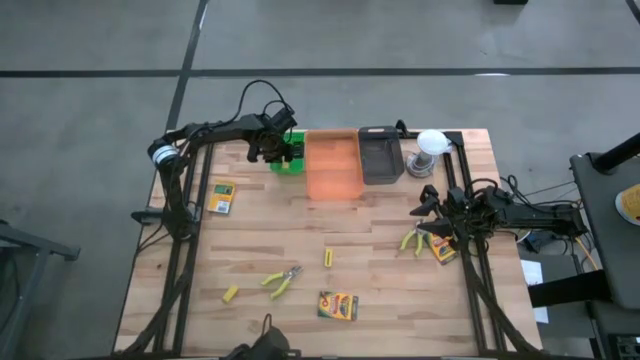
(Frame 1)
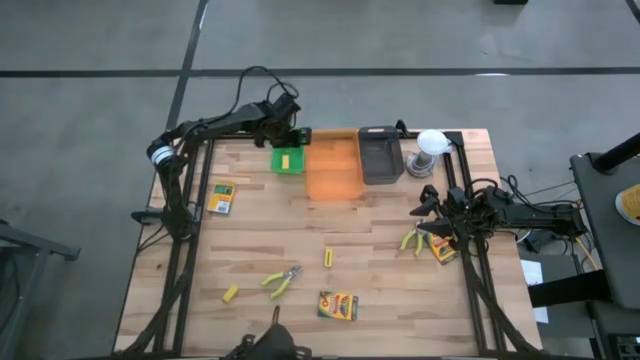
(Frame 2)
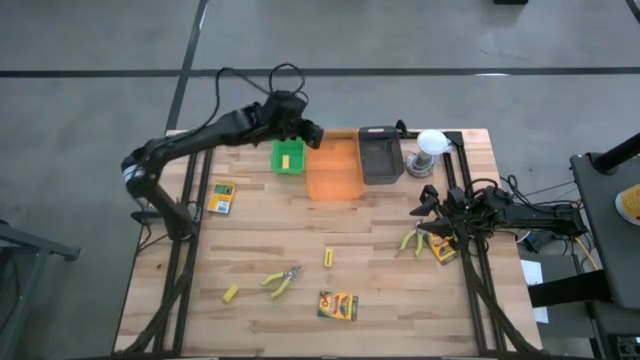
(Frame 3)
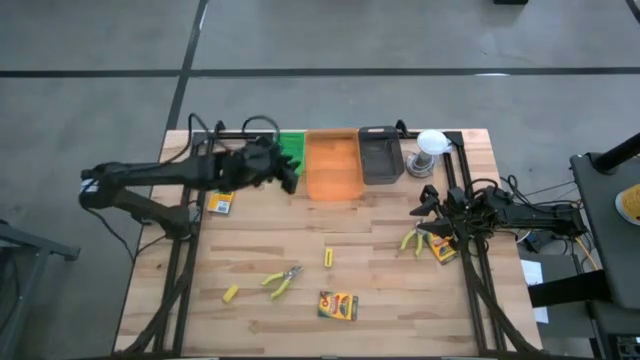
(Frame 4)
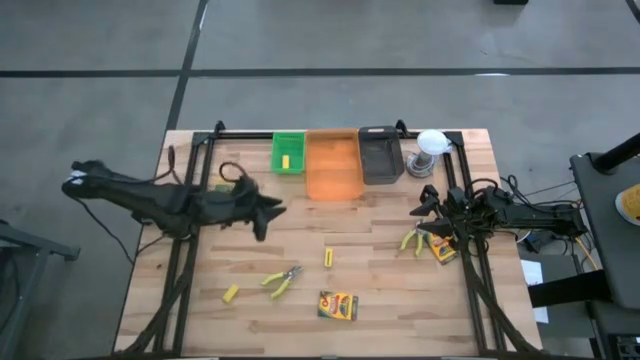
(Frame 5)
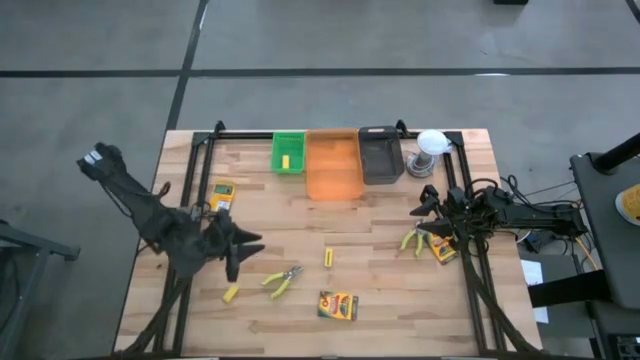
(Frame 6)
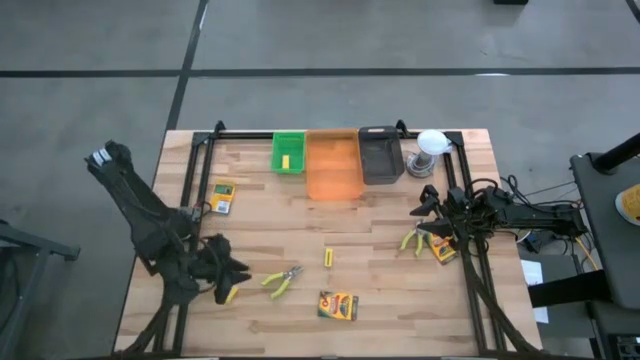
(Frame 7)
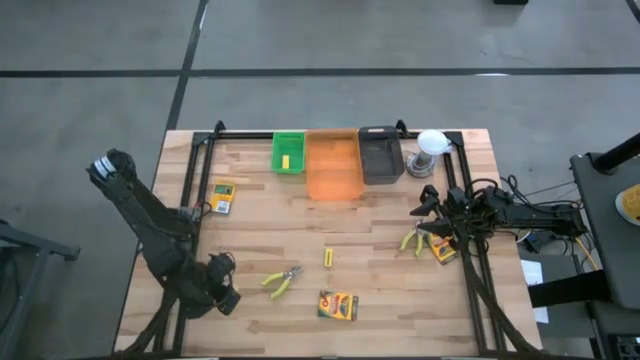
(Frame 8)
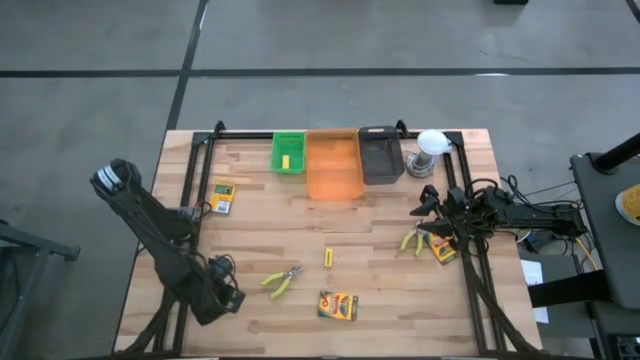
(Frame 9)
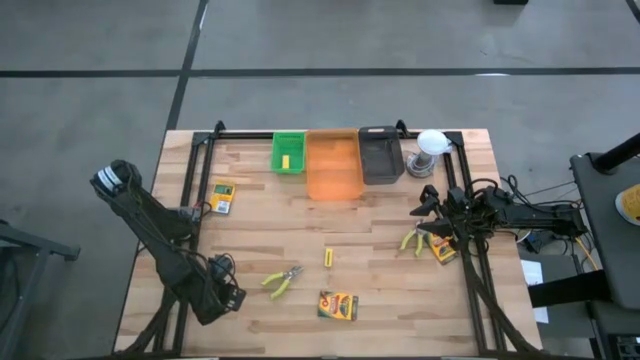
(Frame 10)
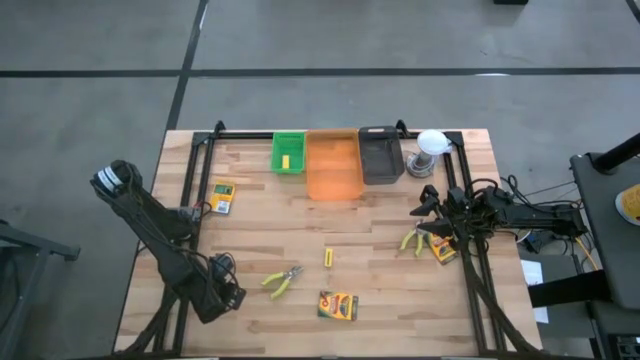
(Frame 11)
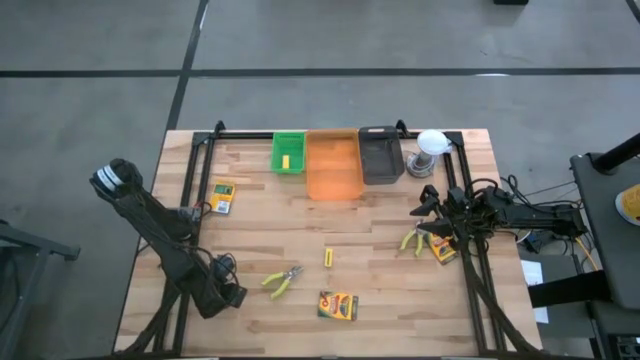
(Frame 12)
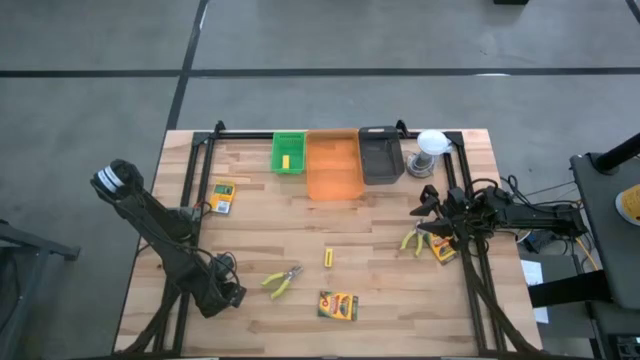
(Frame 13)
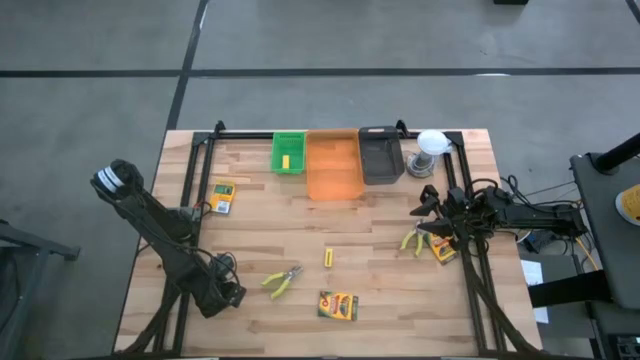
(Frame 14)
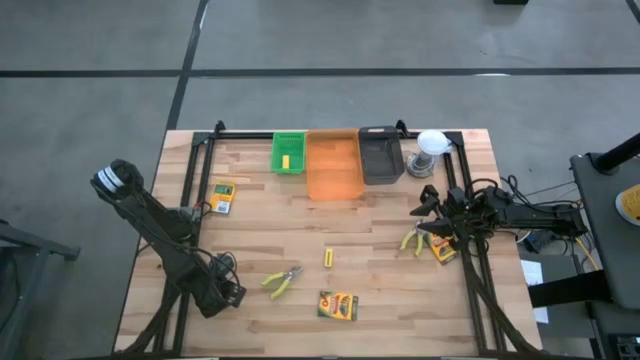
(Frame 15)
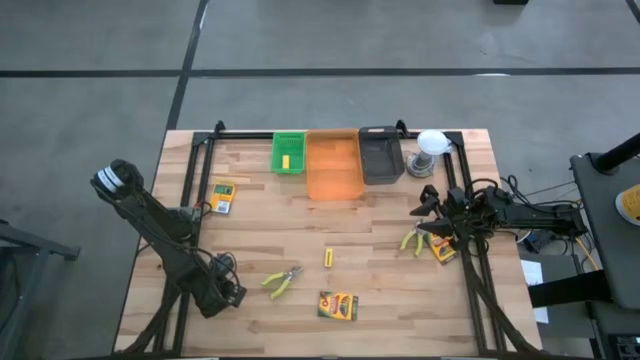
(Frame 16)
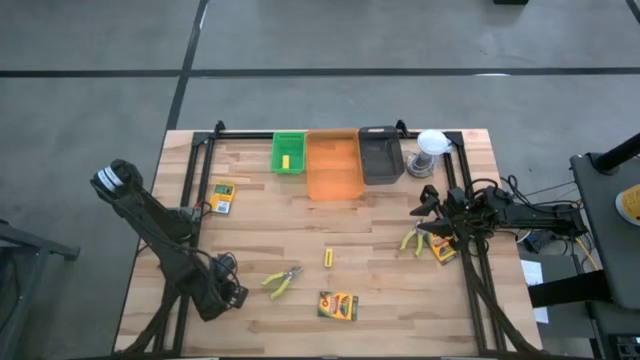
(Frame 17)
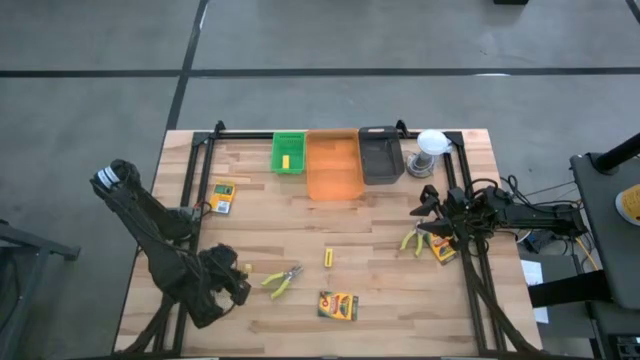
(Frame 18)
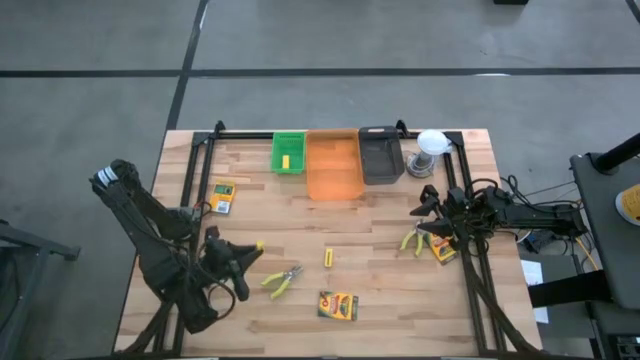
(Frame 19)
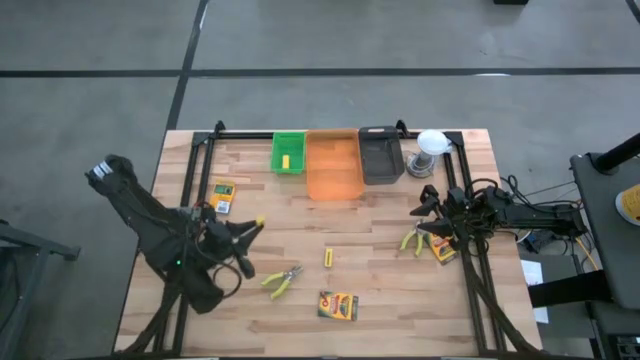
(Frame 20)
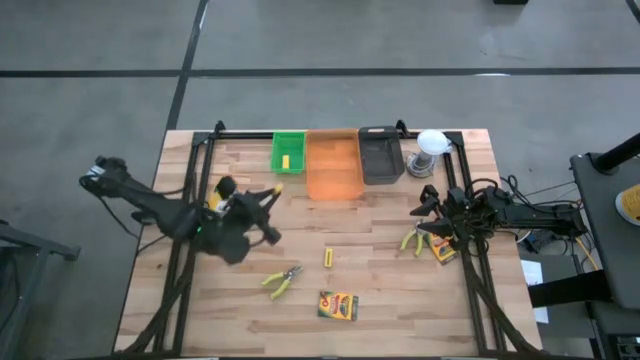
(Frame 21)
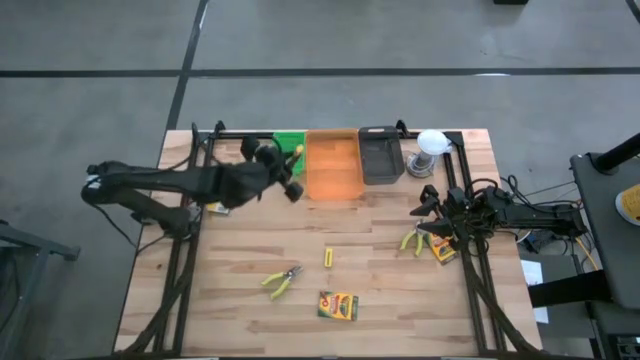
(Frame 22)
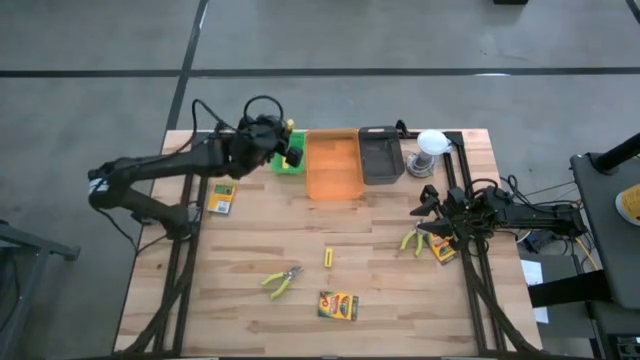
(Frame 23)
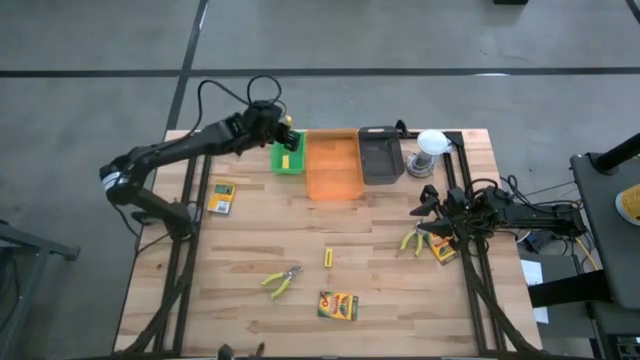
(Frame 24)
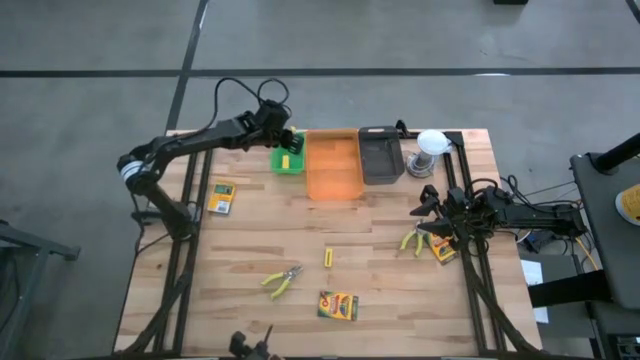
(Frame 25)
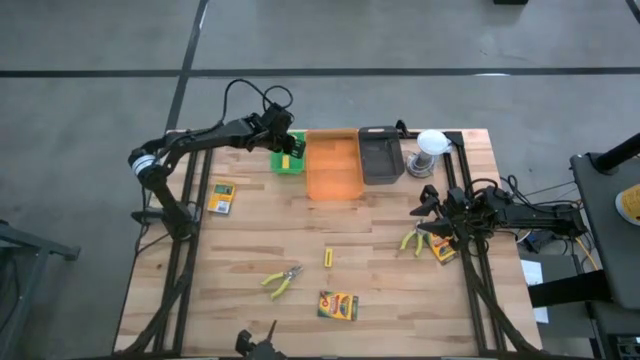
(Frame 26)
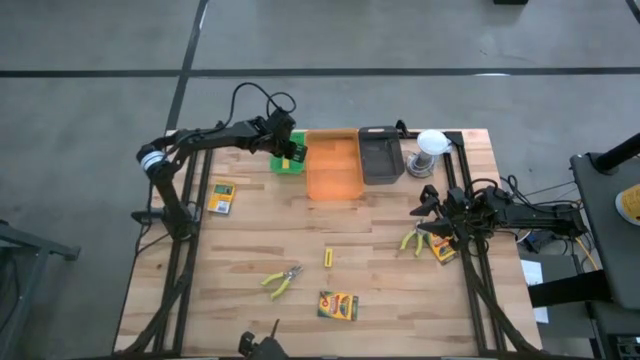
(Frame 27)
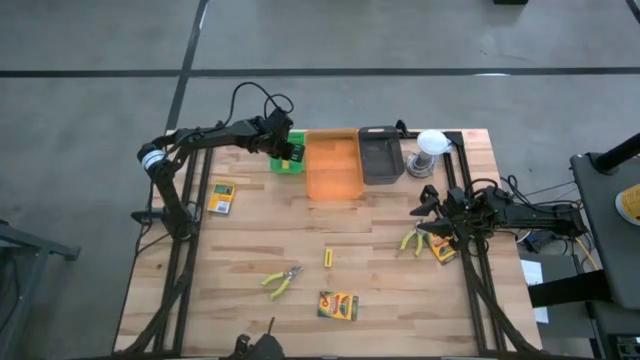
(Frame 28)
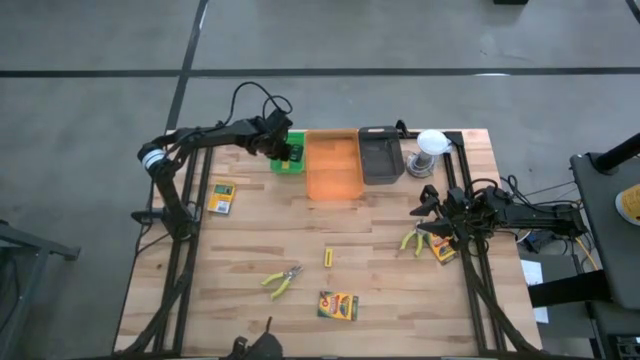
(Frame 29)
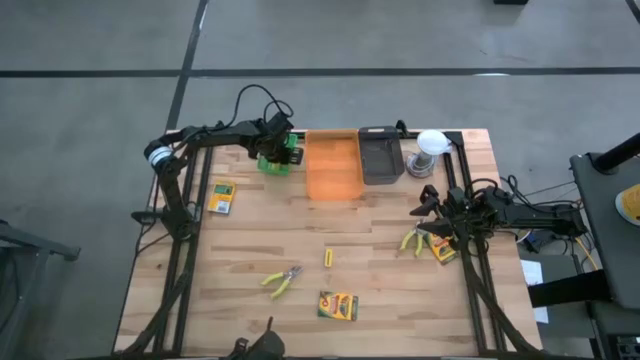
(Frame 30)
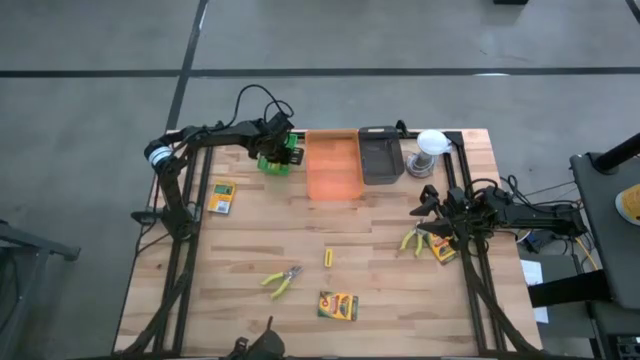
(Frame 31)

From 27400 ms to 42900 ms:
Task: Pick & Place School Supplies
Put the yellow eraser into the green bin

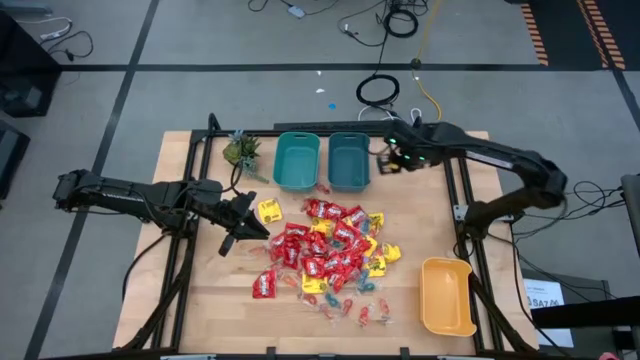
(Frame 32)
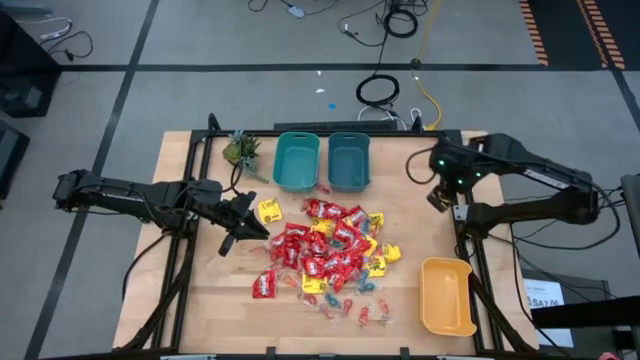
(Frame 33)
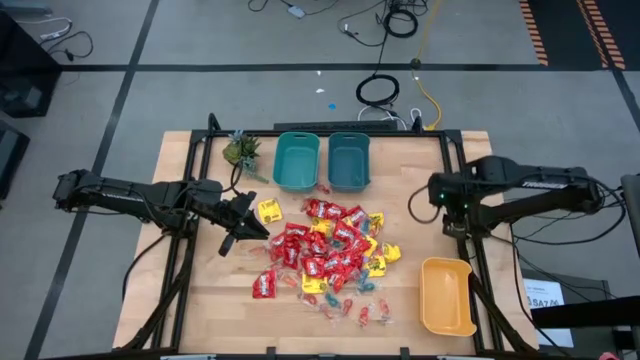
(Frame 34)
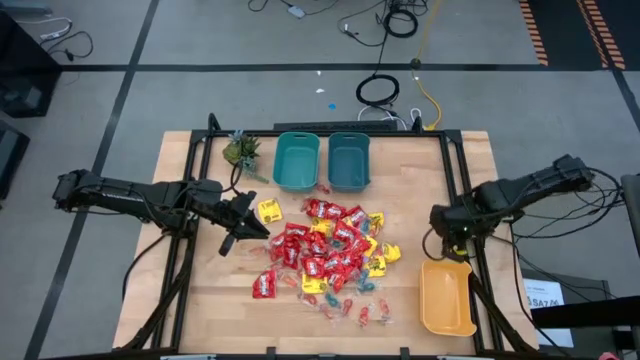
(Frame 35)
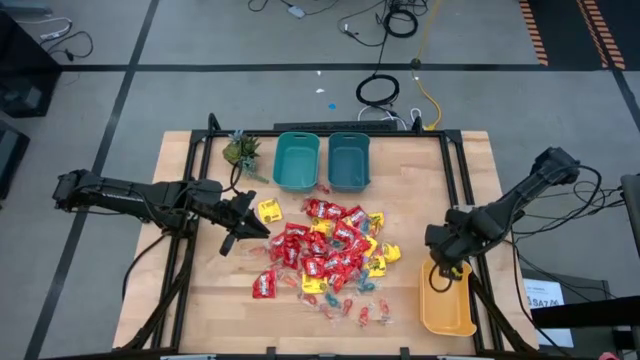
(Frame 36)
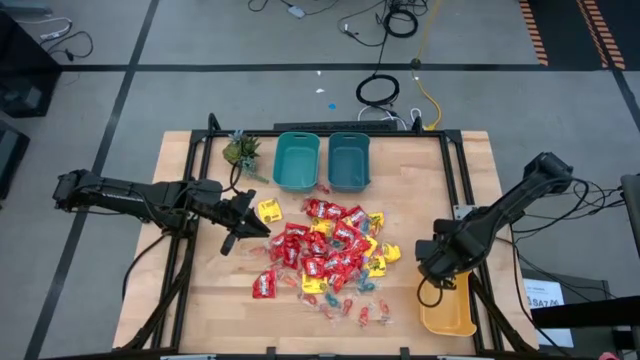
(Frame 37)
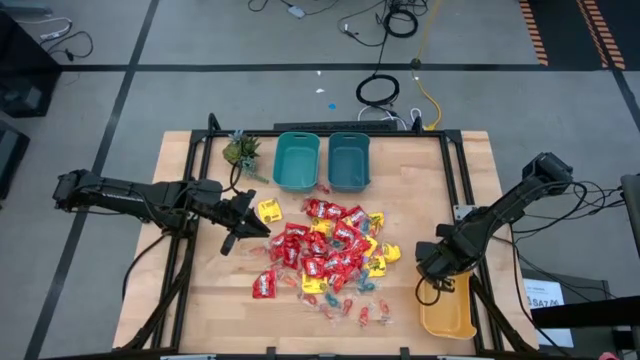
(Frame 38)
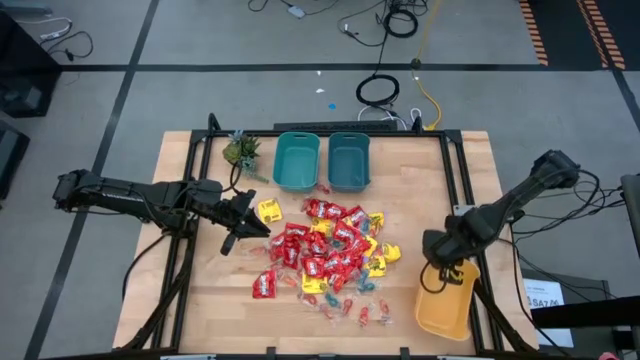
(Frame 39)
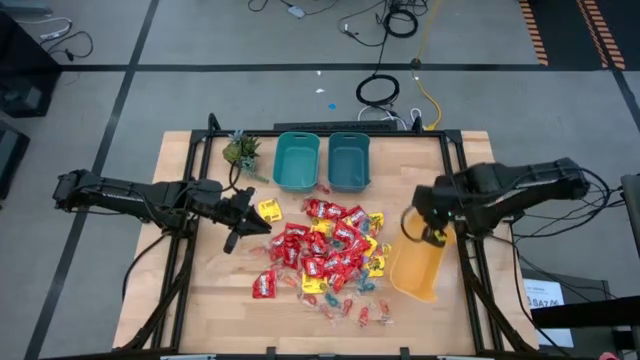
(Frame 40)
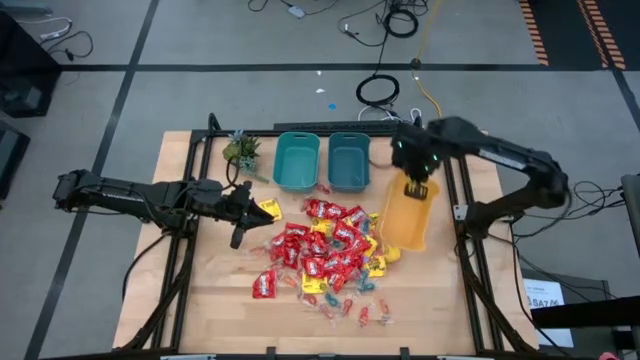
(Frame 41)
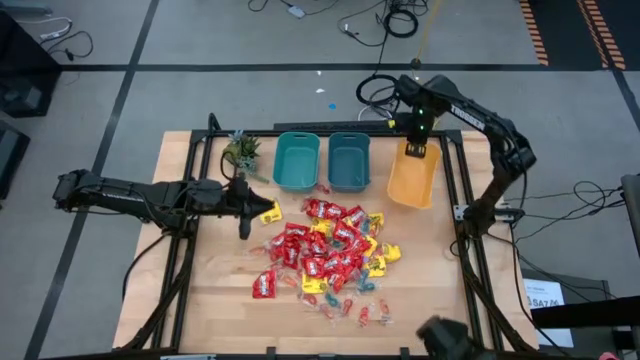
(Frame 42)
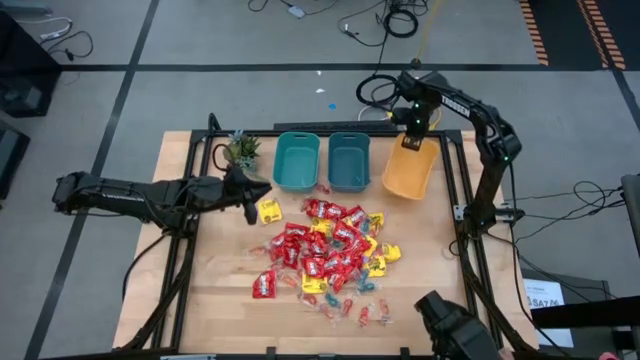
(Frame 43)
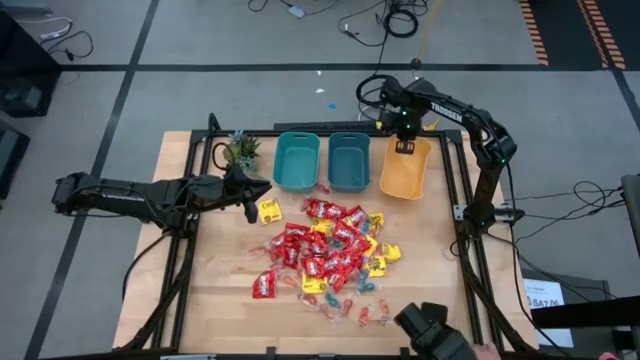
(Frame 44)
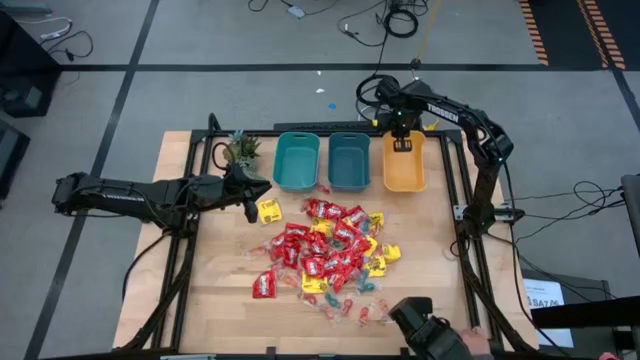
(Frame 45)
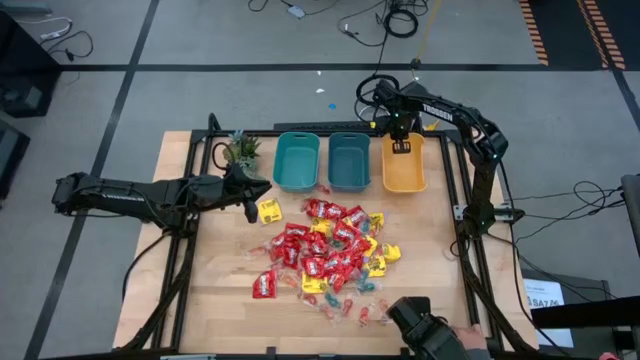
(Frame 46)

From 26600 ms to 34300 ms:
Task: Sort candy
Move the yellow bin to the top right of the table
